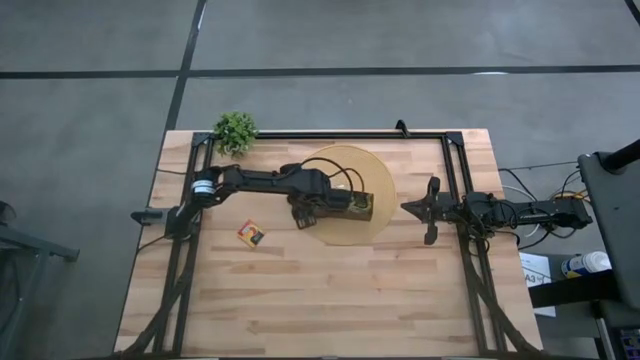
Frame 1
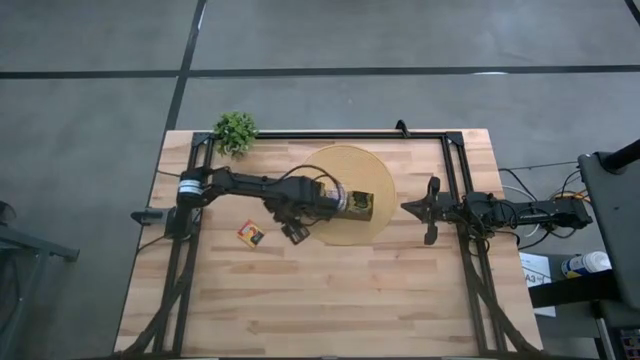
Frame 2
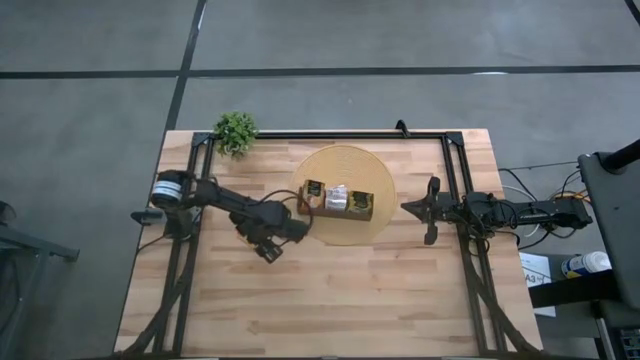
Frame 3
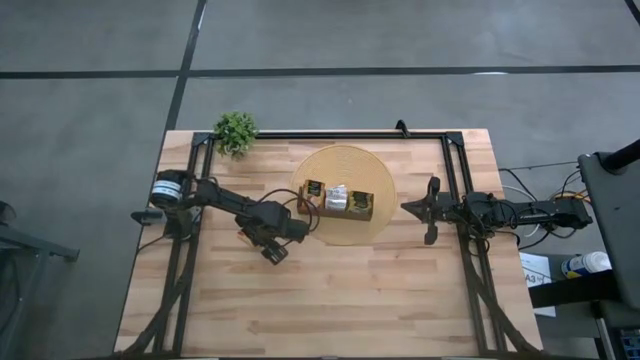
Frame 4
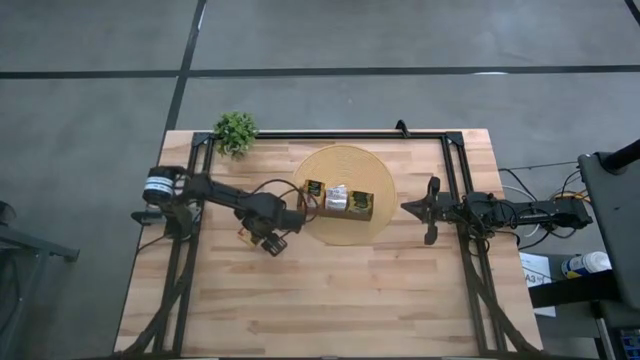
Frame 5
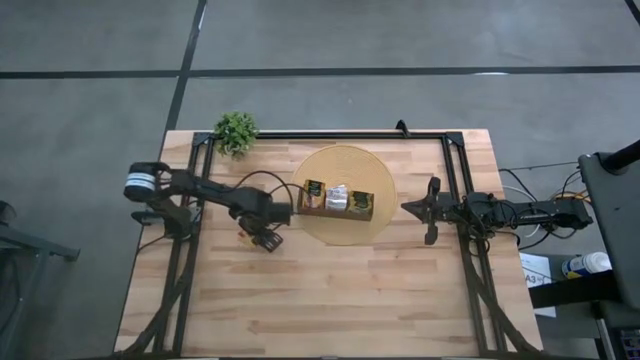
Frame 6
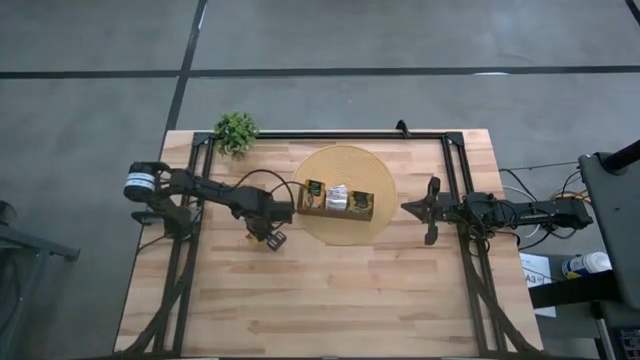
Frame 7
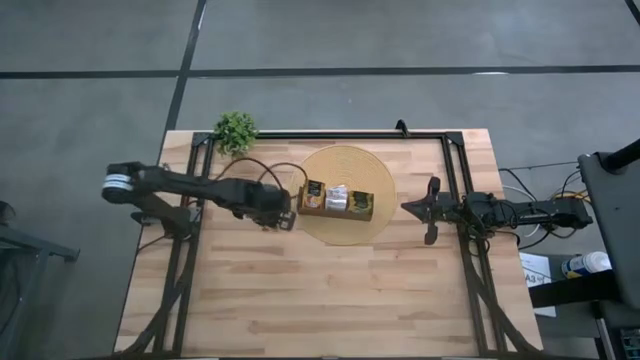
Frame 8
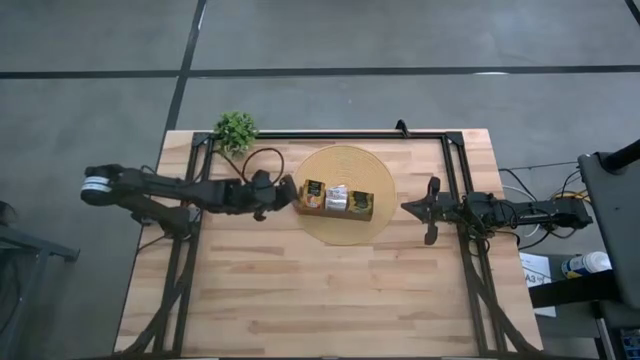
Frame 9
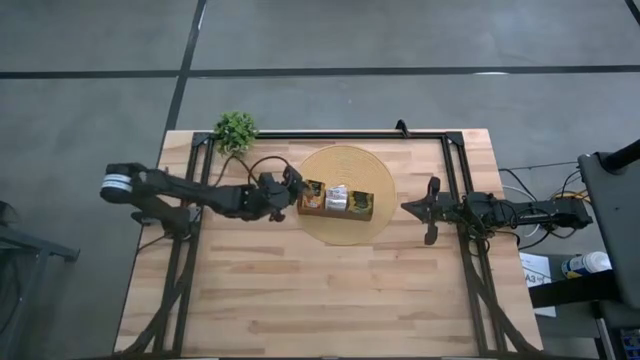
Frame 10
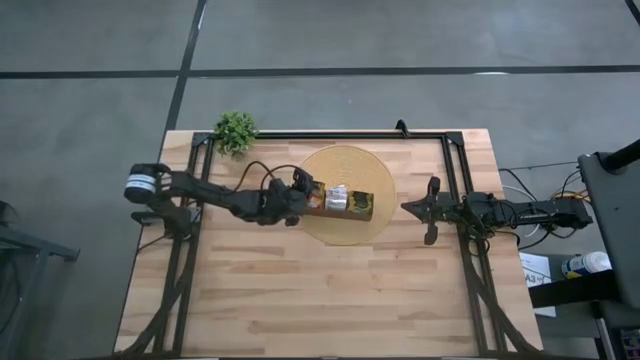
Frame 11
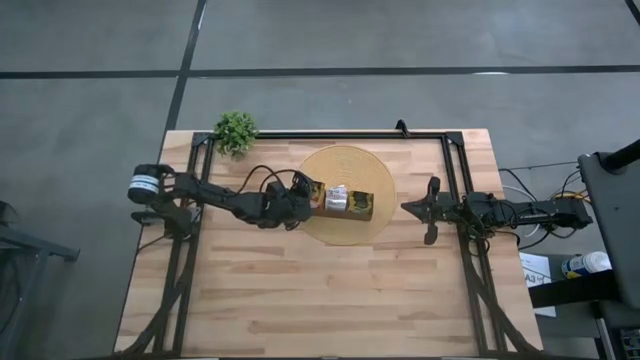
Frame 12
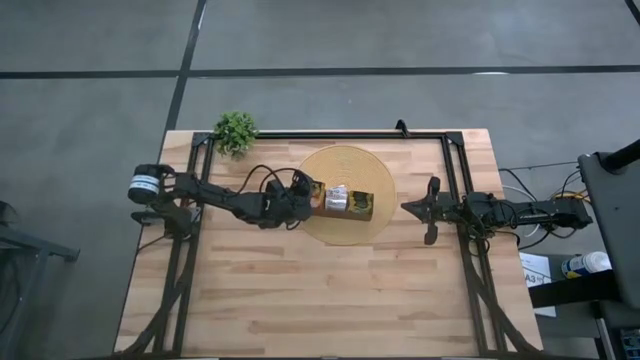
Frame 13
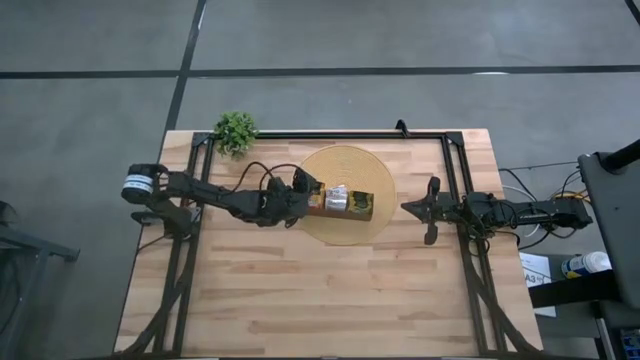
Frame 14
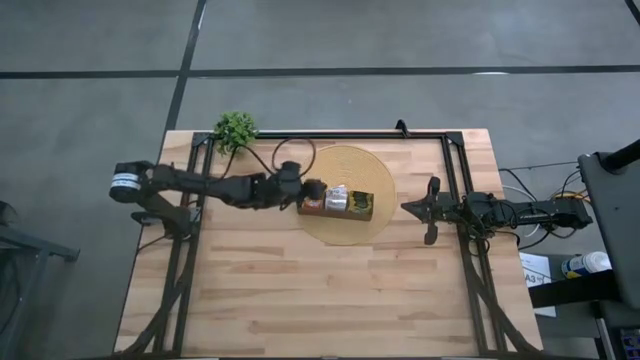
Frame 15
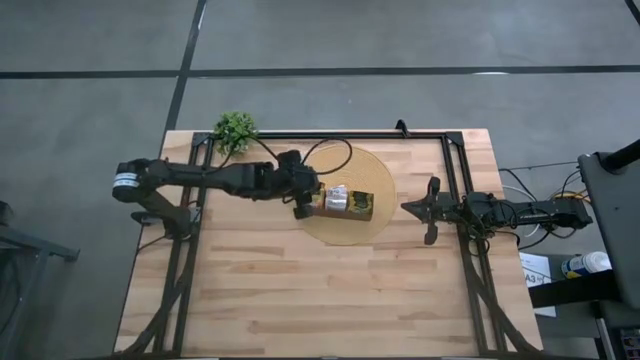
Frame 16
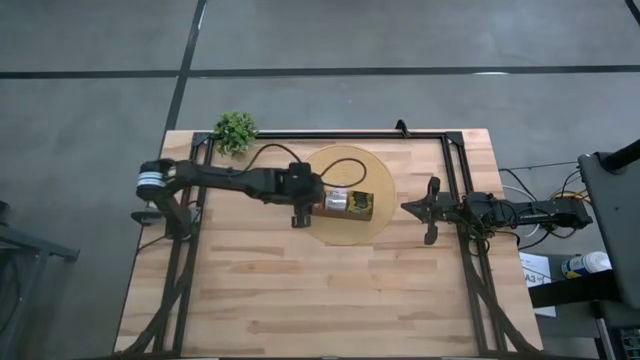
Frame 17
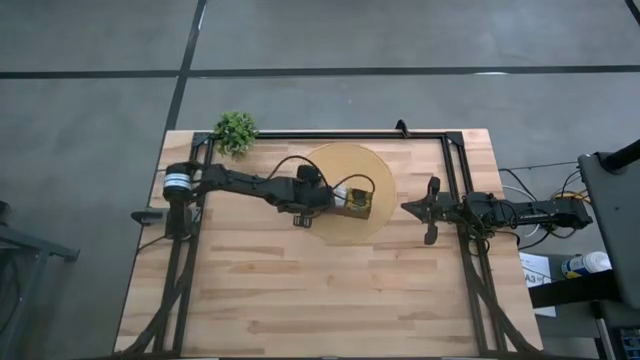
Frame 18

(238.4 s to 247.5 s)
Task: Pick & Place Tea
Put the orange tea bag into the left section of the wooden organizer

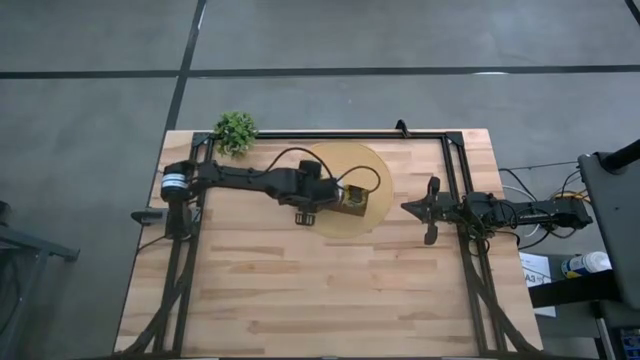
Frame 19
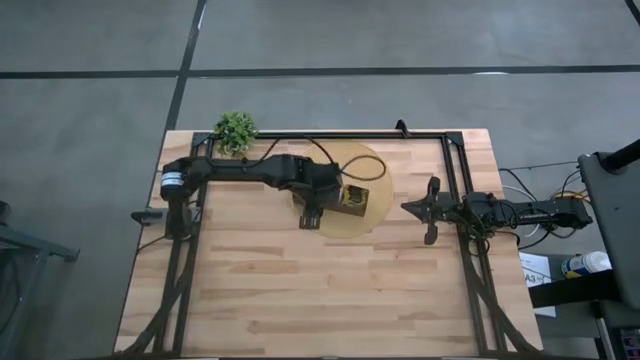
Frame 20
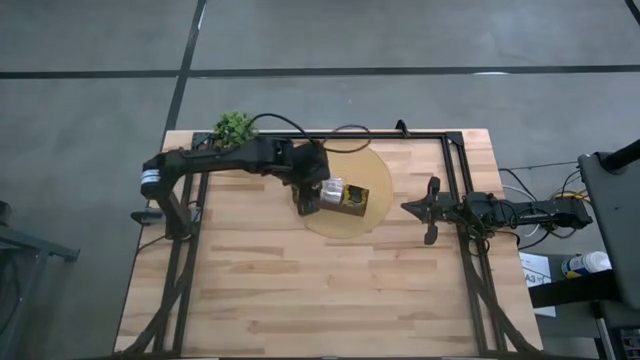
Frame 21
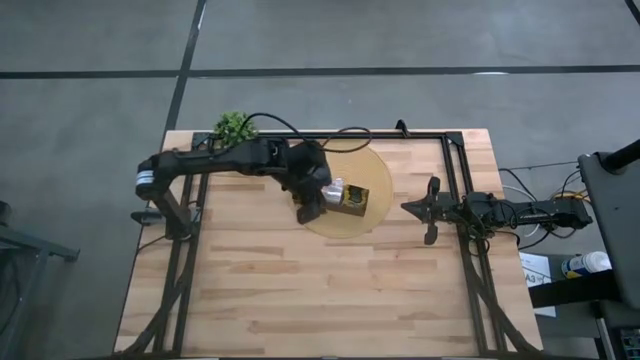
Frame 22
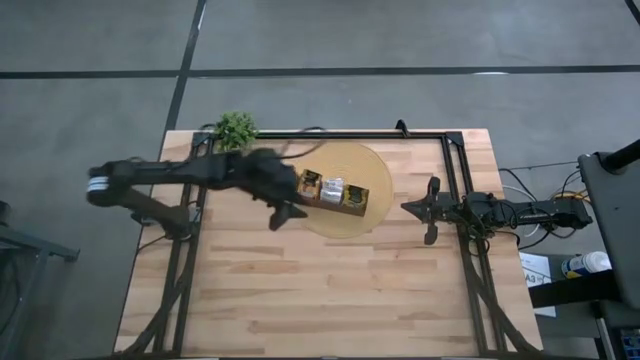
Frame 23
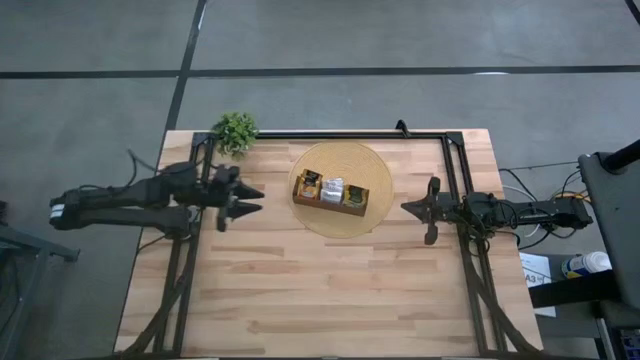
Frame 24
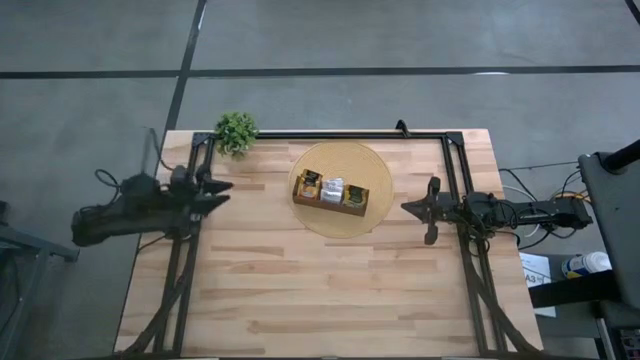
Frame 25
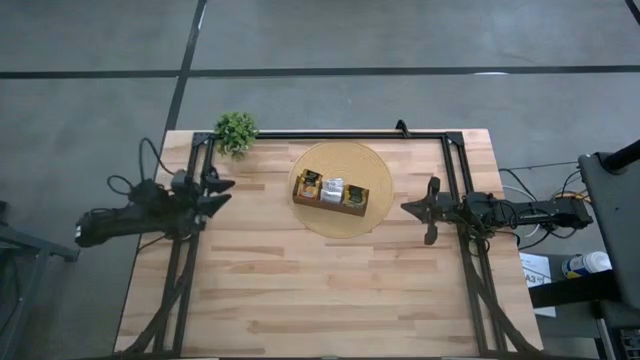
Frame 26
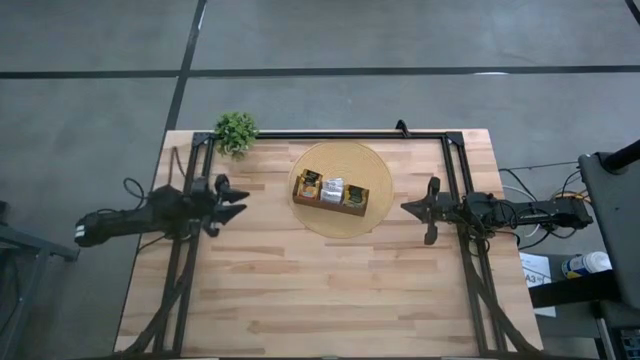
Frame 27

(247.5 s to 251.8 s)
Return to Home Position

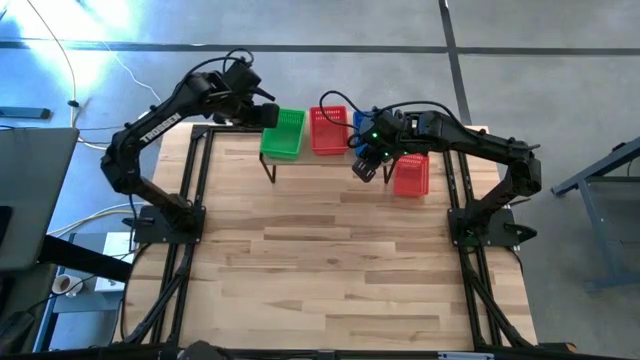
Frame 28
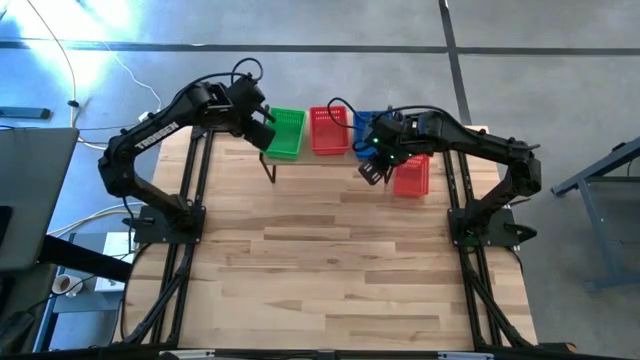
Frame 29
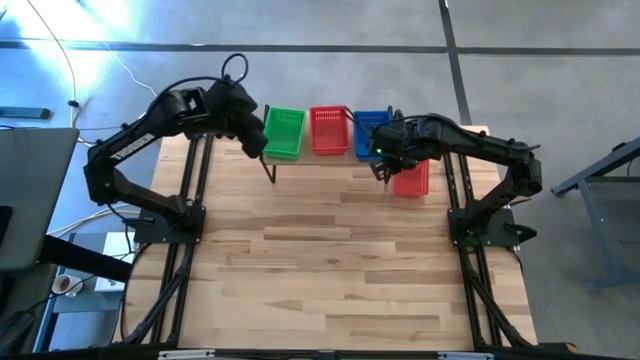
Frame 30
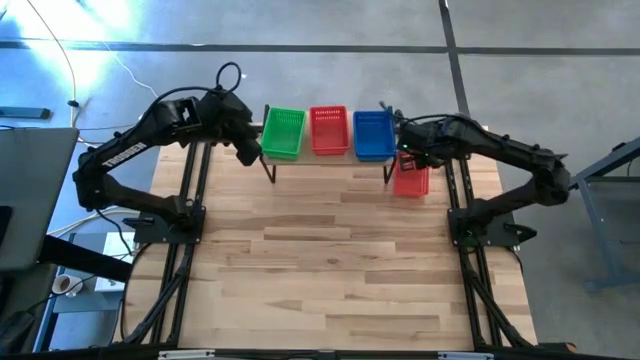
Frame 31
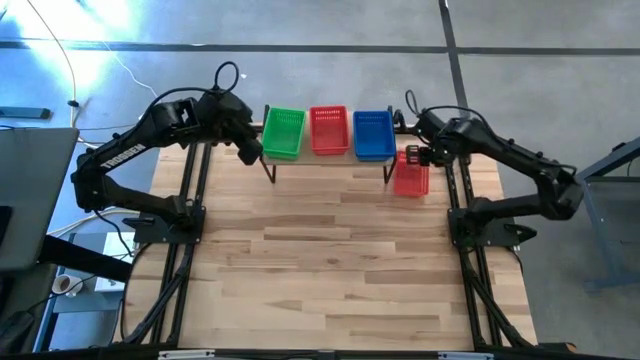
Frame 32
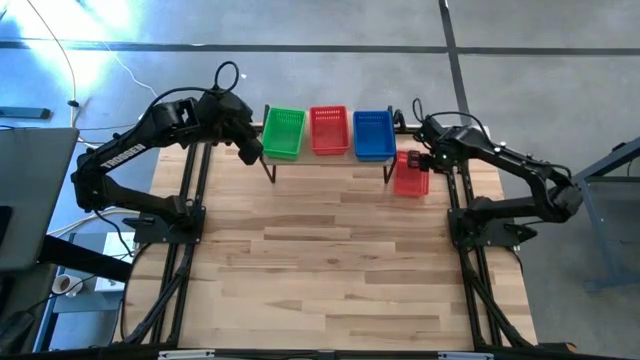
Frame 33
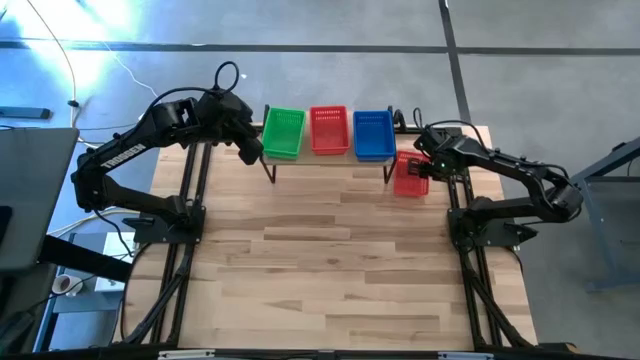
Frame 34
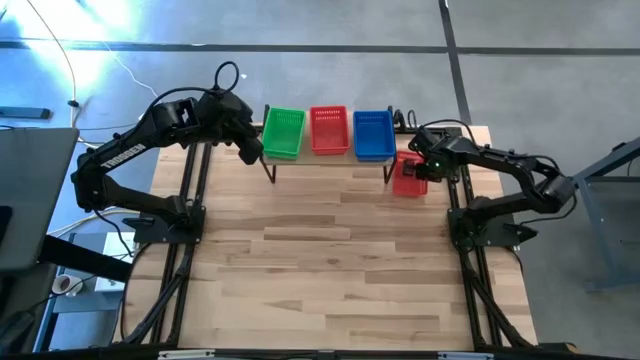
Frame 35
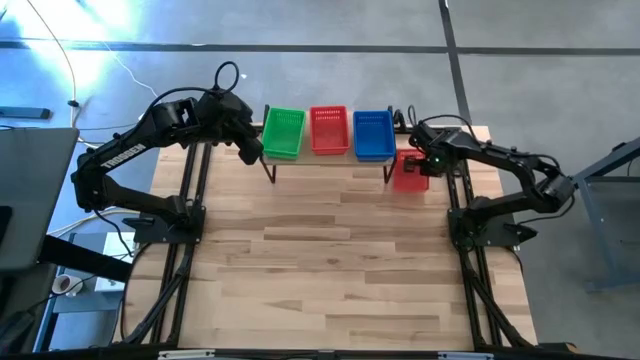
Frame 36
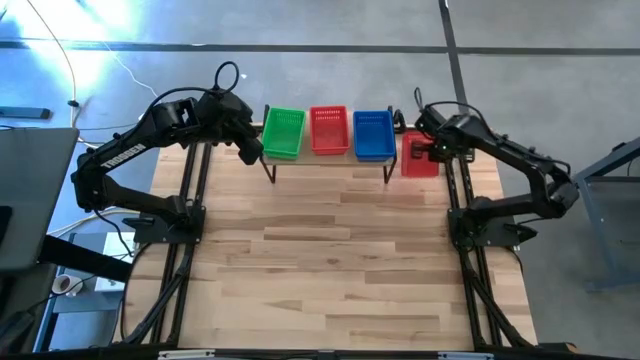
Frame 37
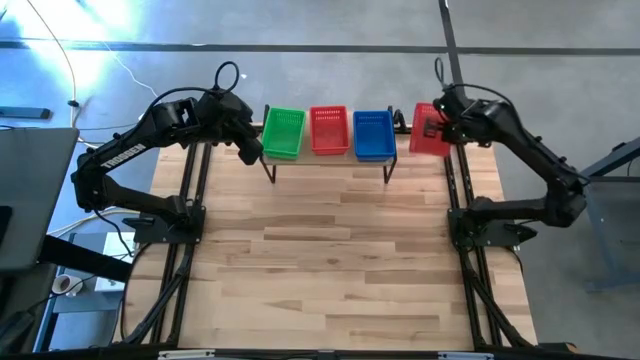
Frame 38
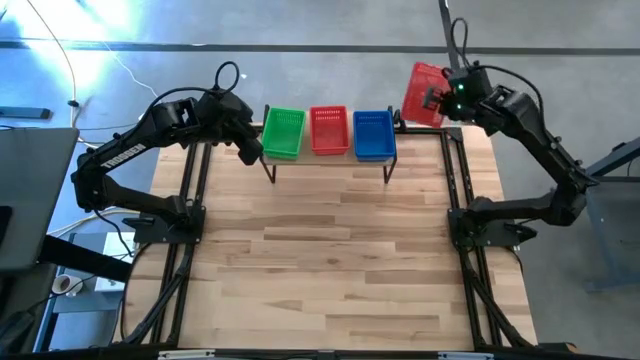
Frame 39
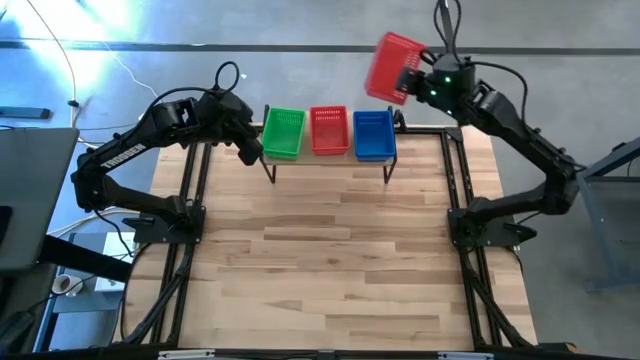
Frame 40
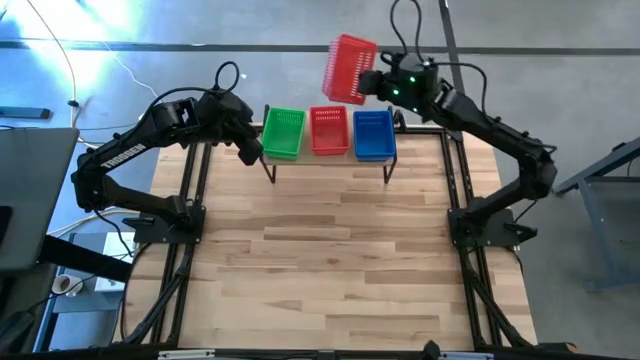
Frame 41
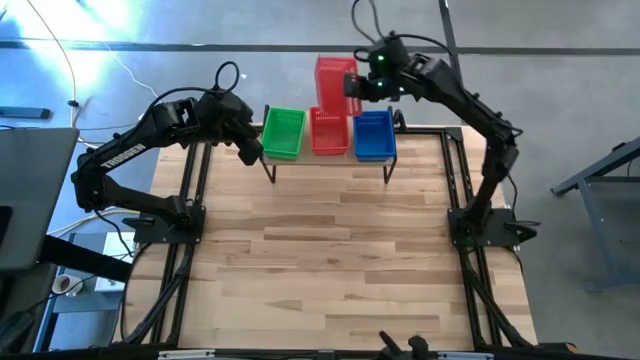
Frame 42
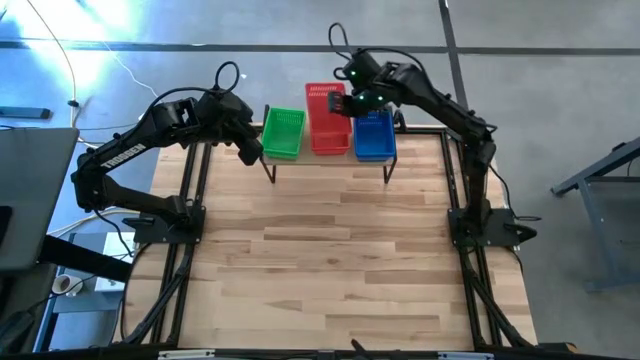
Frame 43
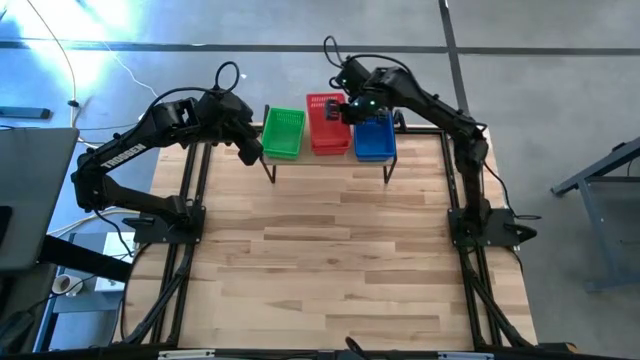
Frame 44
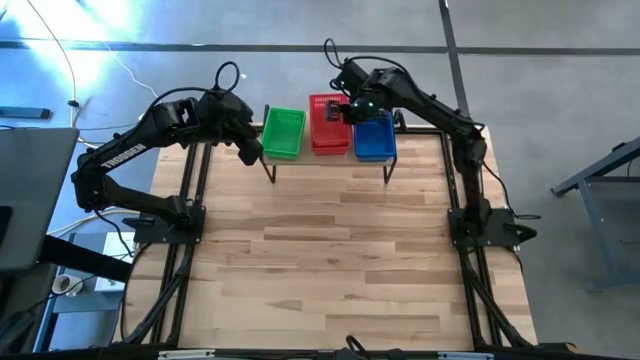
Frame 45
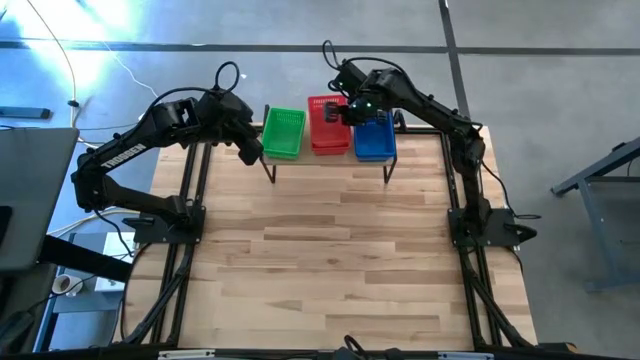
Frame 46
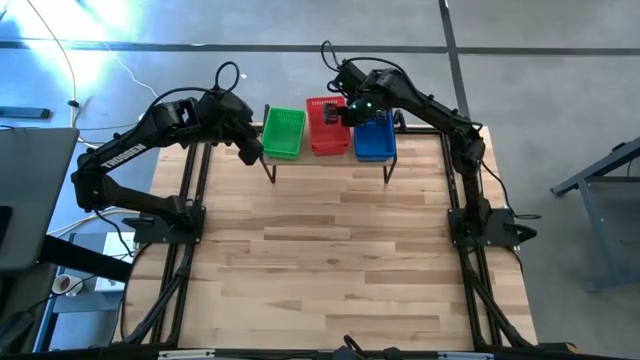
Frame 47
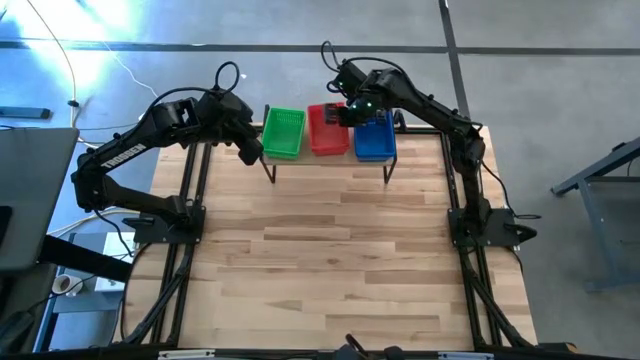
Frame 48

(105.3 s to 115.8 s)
Task: Stack baskets on shelf by color
Stack the red bin on top of the stacked red bins on the shelf
